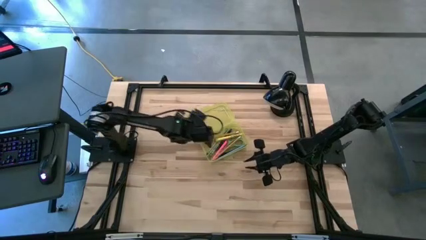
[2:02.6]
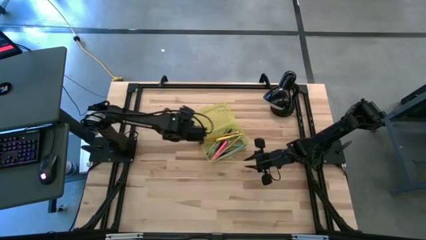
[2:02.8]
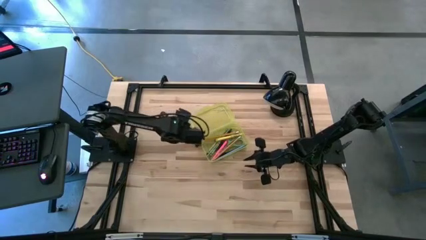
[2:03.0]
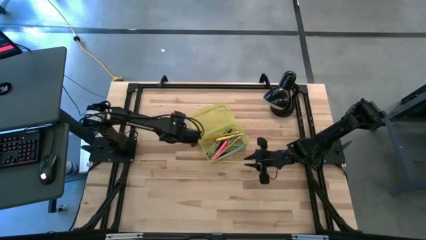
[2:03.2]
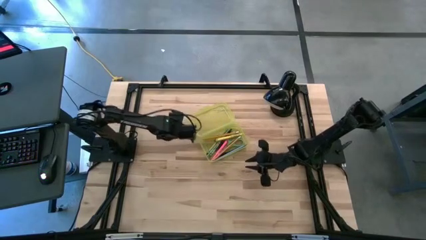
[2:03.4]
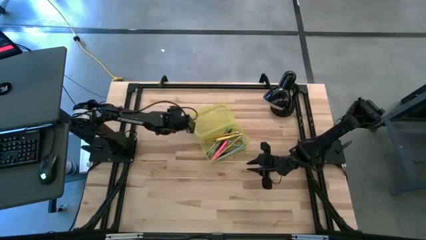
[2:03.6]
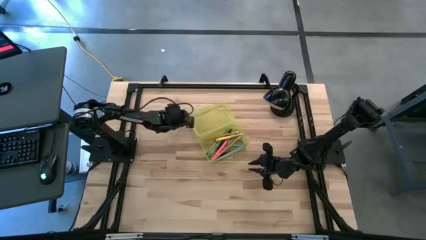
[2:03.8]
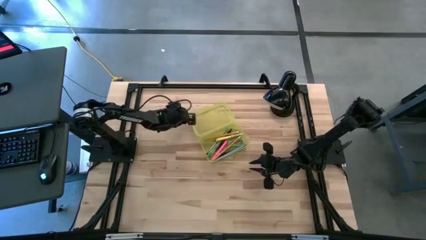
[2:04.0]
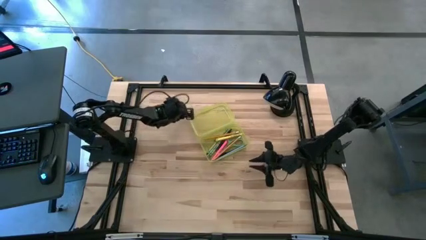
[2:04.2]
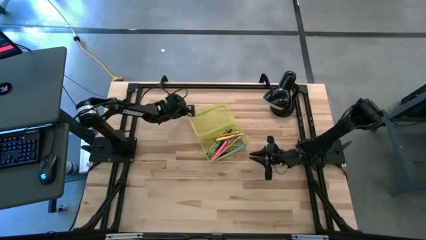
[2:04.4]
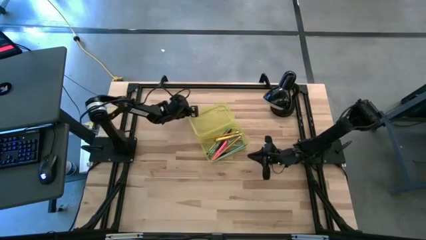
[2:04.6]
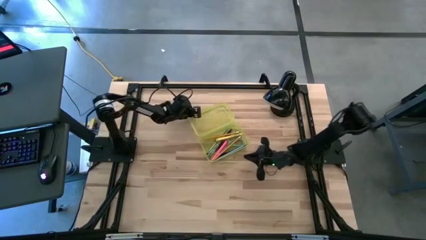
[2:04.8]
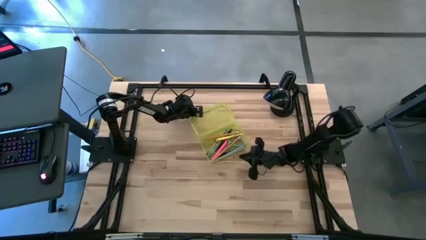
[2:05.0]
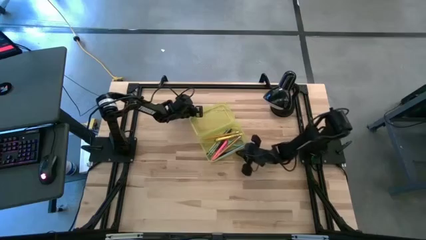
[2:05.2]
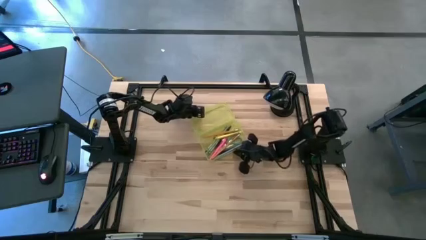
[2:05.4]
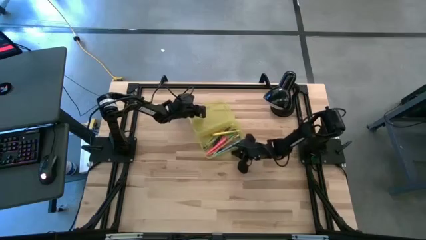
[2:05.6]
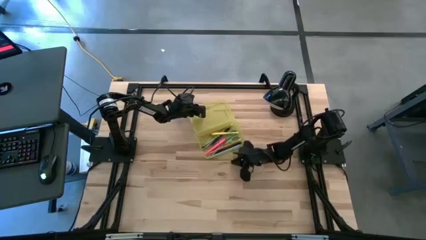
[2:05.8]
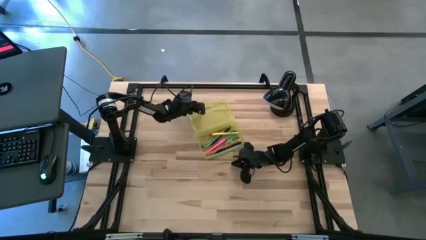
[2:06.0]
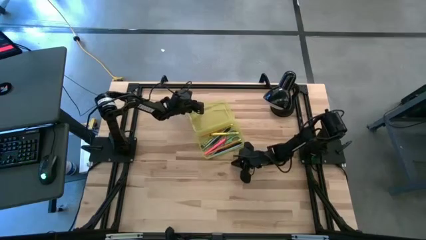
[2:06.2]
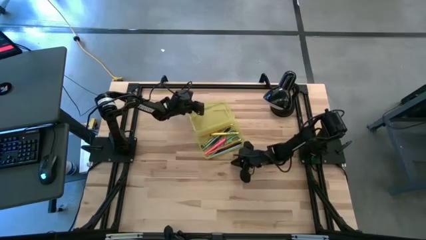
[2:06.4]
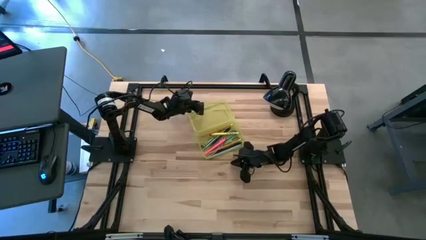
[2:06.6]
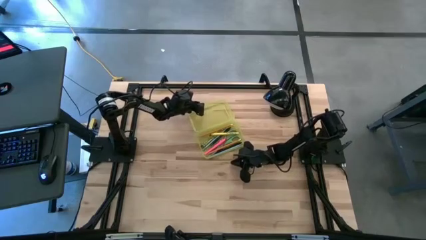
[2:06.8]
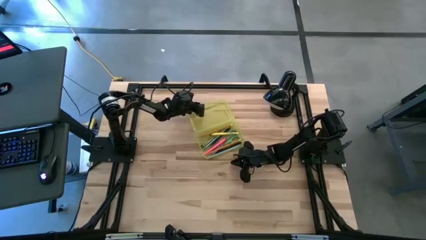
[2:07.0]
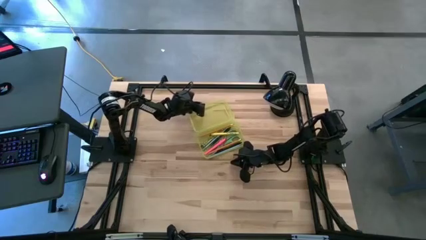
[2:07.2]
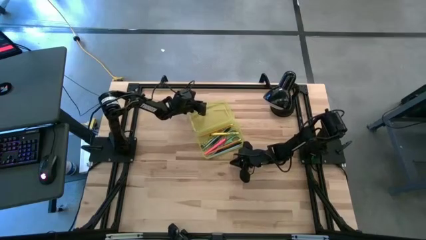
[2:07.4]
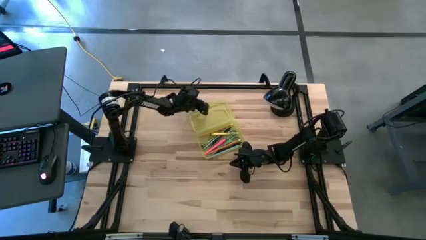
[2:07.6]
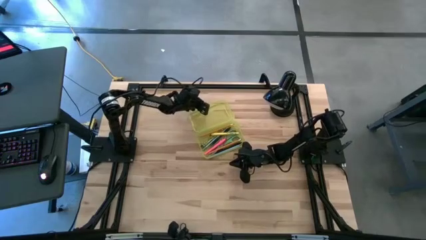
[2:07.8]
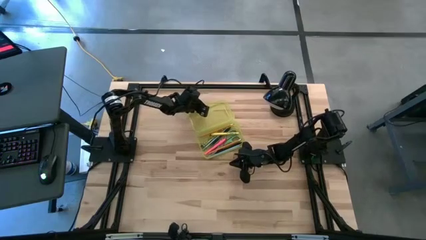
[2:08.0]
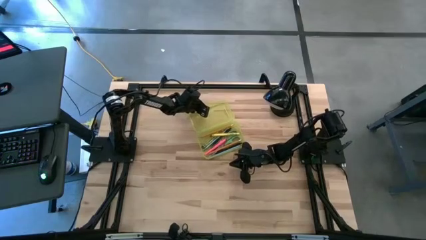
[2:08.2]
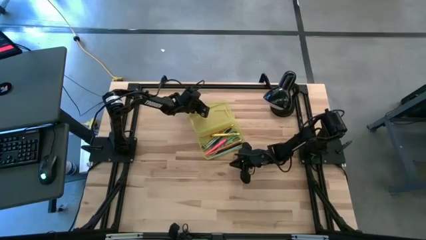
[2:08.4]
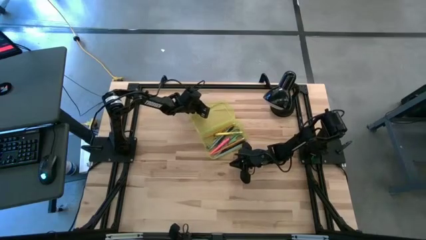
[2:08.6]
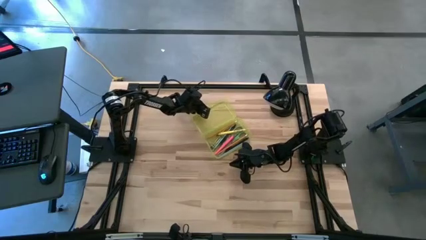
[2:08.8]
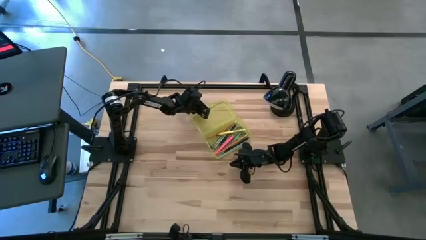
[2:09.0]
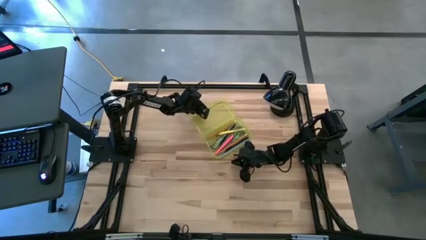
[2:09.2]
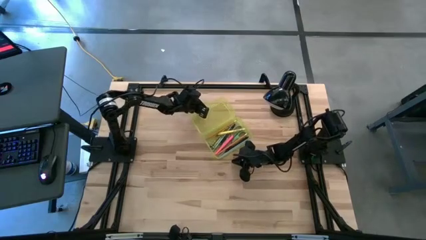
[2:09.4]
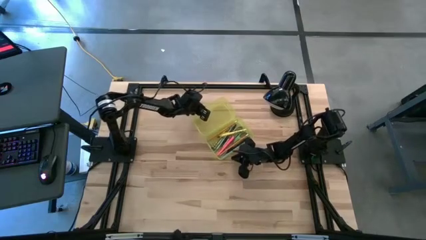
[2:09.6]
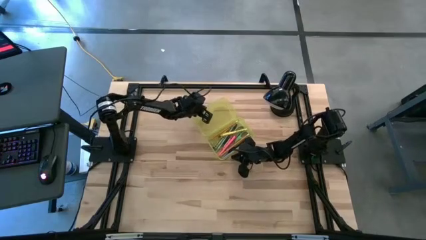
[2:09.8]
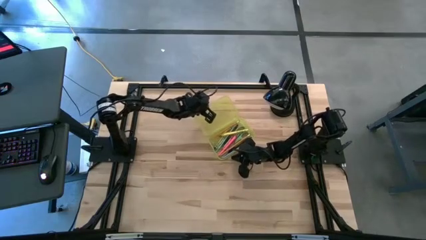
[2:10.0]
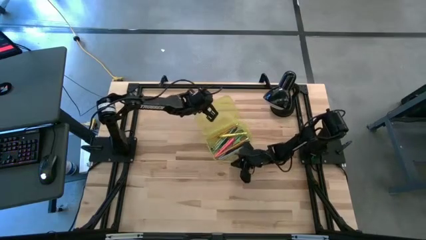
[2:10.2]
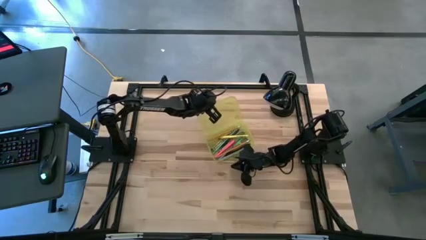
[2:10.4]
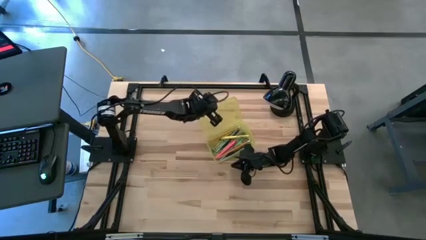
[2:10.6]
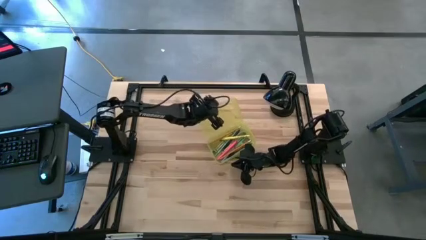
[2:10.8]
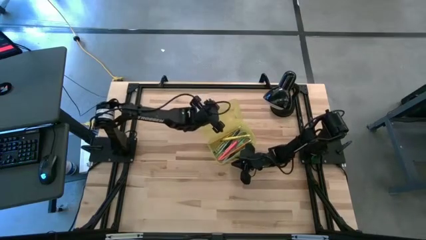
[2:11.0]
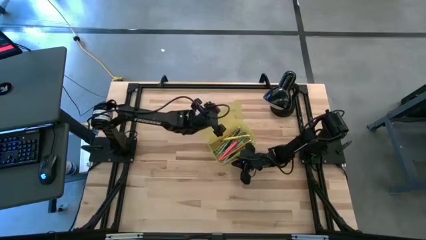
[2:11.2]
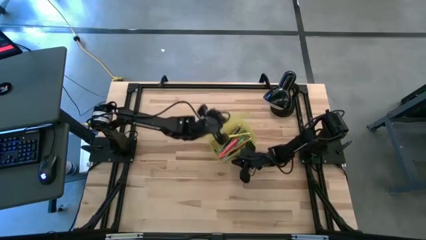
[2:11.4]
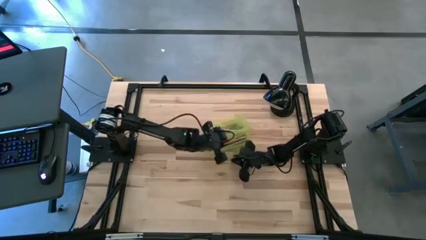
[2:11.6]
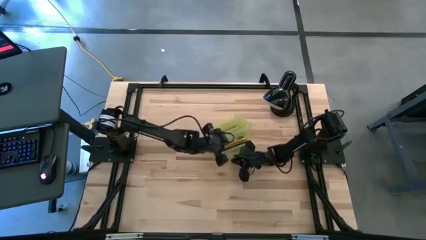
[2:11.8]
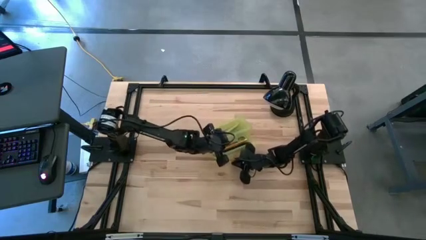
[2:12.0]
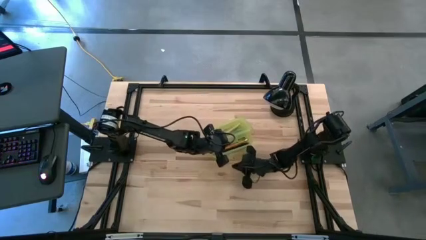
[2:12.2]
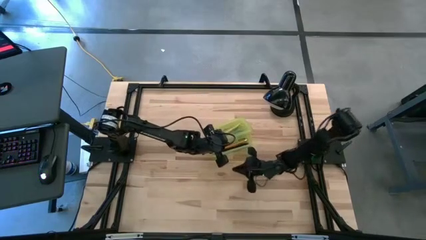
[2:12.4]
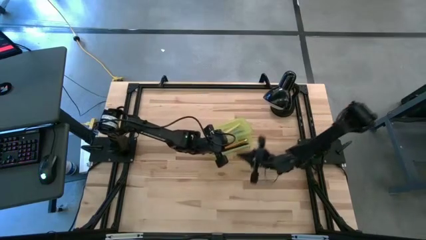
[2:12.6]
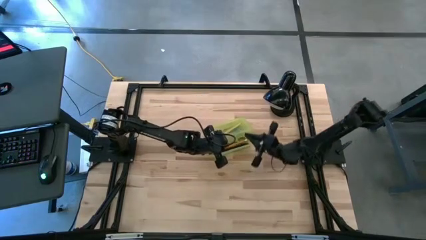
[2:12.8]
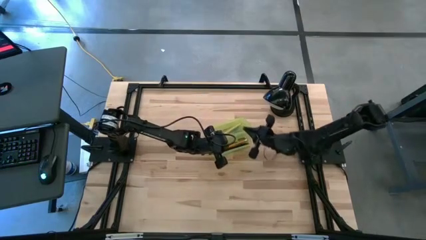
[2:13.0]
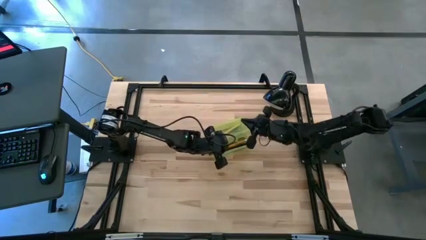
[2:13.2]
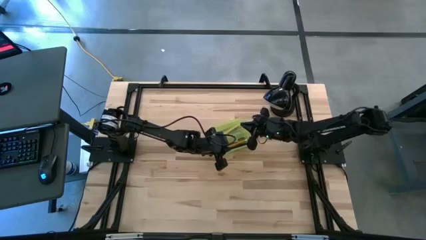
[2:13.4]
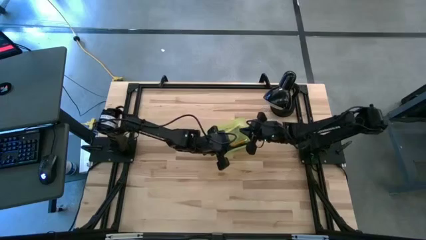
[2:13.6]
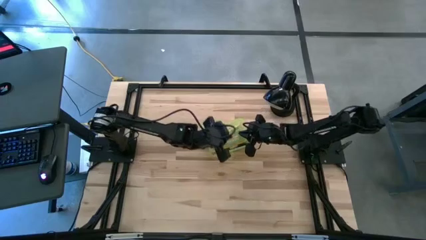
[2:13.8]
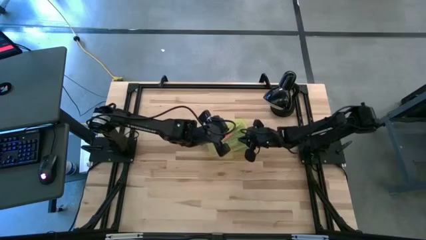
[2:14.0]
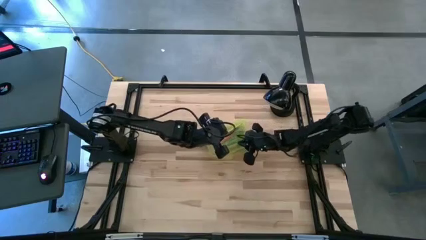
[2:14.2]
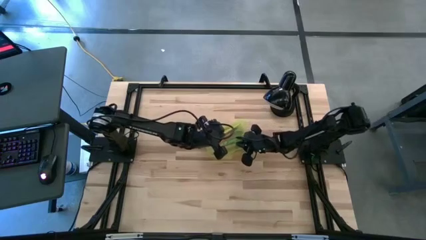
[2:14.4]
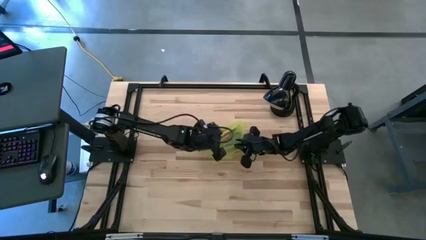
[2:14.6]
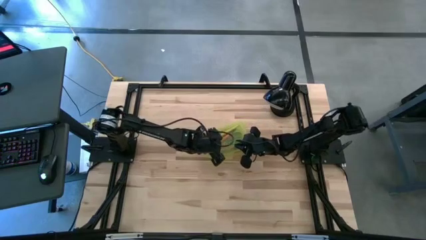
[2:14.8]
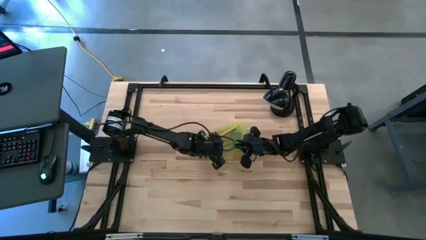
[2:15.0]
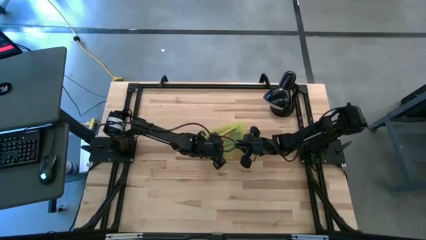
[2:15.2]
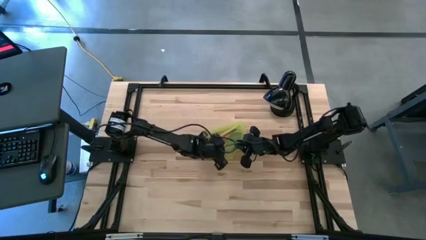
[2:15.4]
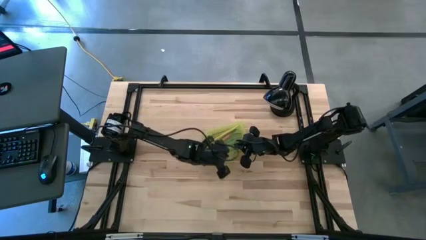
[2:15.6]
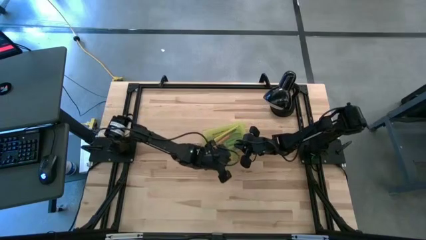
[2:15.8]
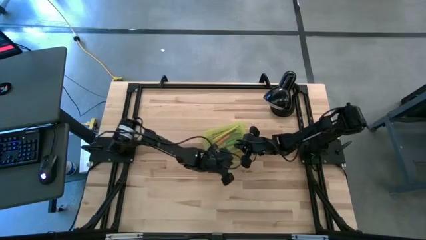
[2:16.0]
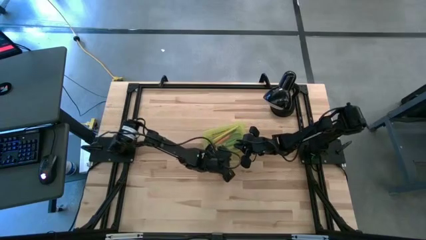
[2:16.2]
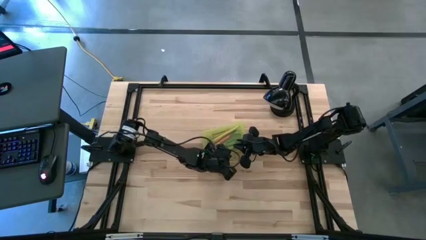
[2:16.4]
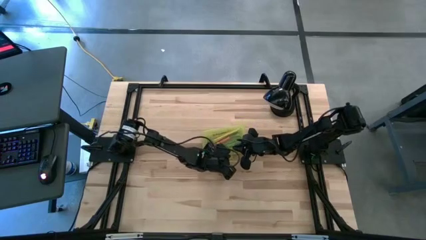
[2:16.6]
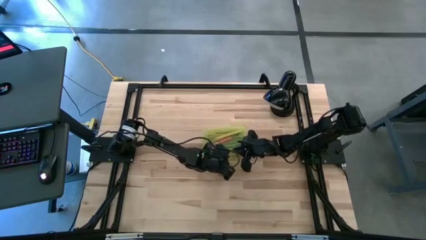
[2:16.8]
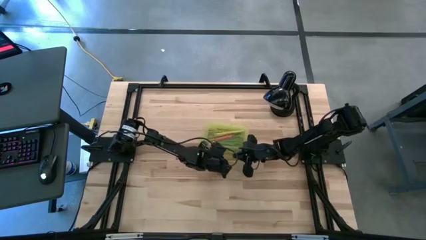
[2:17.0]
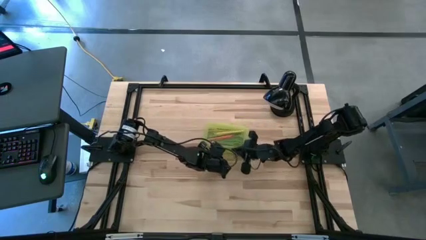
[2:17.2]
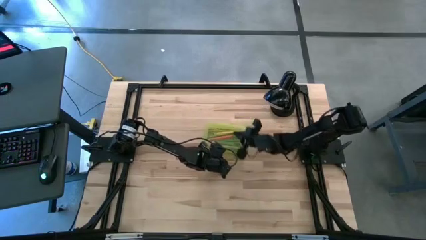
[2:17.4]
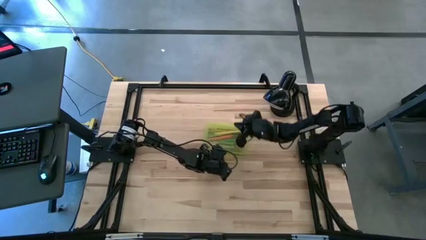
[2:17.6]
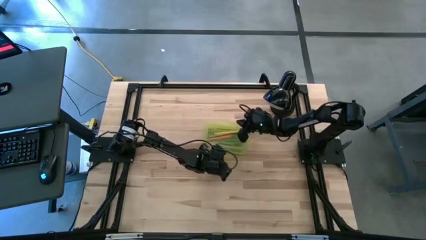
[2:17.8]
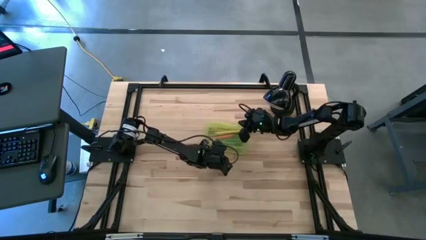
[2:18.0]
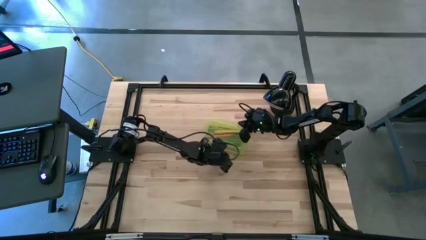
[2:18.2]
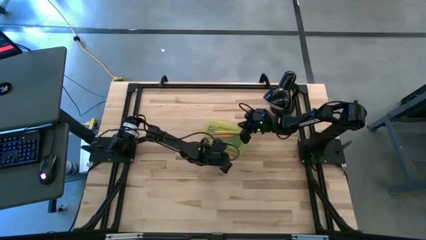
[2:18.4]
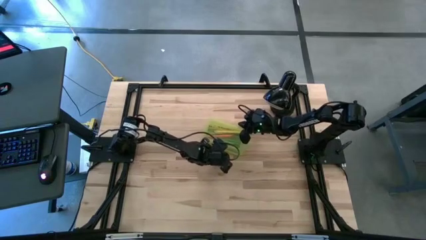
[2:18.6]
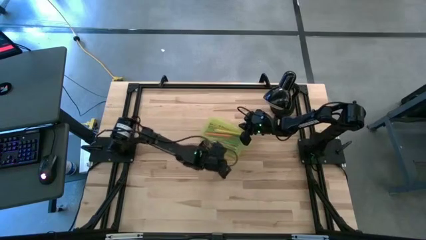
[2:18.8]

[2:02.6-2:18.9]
Task: Pick & place school supplies into a supply box
Close the yellow supply box
